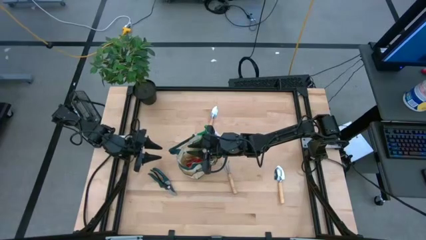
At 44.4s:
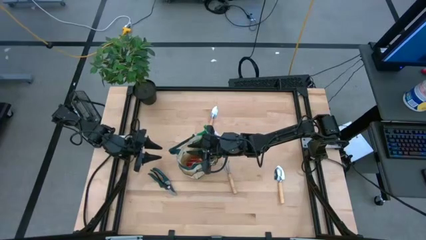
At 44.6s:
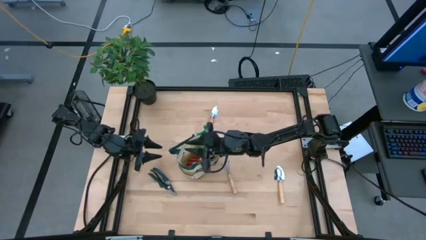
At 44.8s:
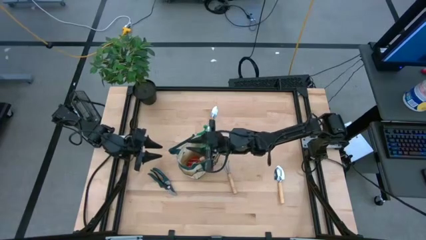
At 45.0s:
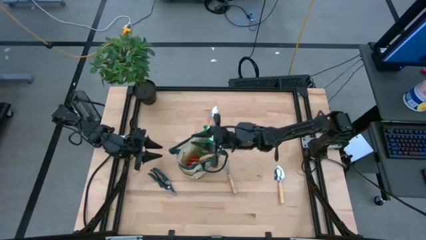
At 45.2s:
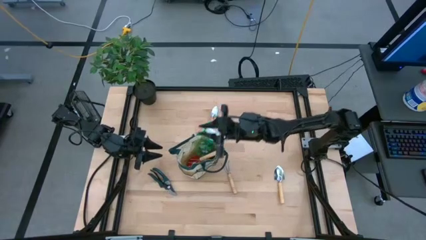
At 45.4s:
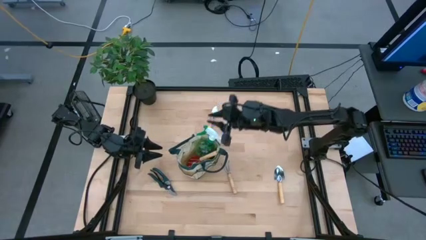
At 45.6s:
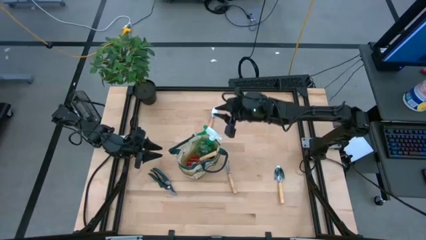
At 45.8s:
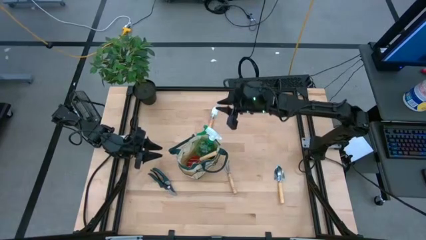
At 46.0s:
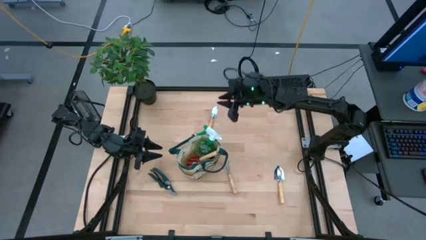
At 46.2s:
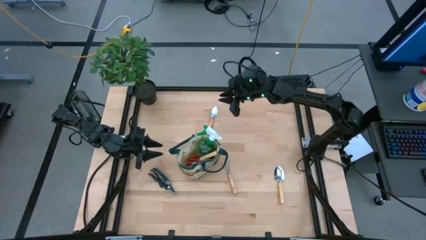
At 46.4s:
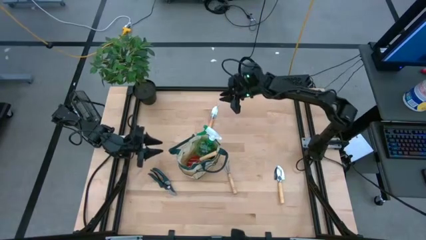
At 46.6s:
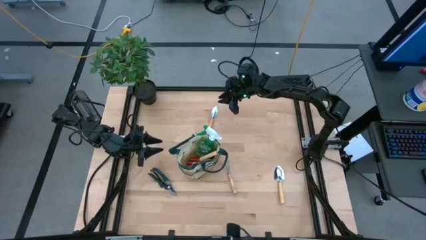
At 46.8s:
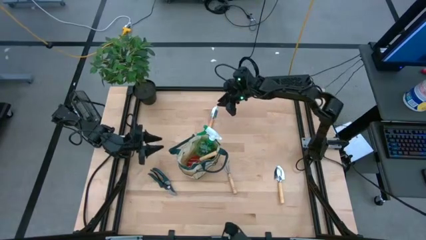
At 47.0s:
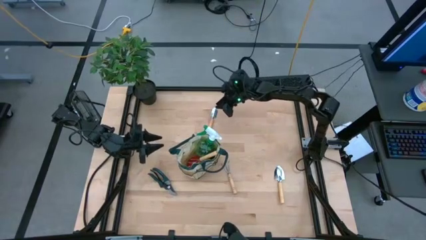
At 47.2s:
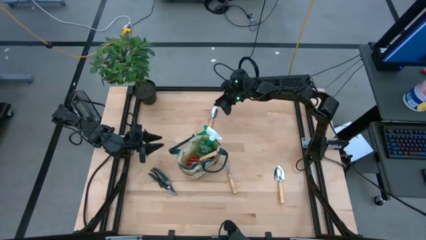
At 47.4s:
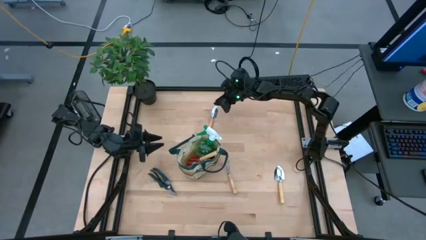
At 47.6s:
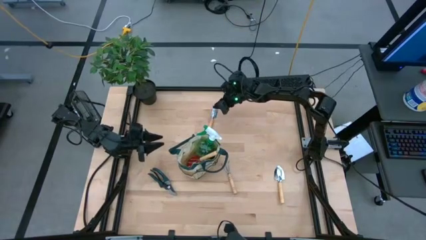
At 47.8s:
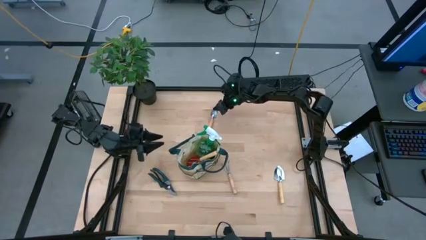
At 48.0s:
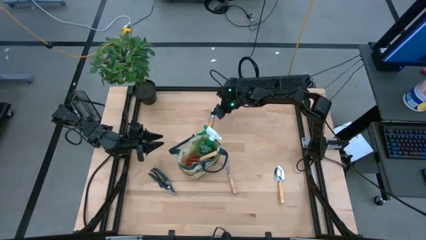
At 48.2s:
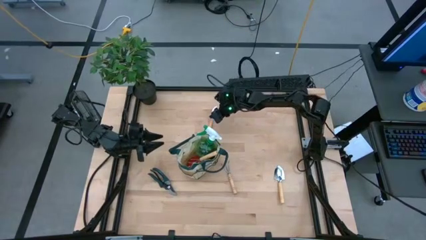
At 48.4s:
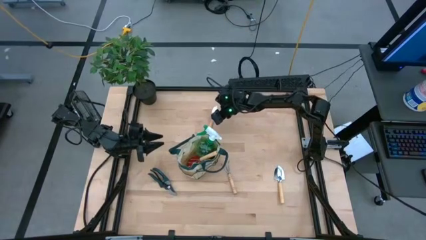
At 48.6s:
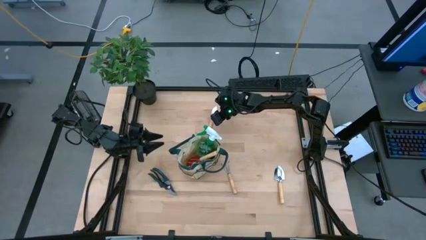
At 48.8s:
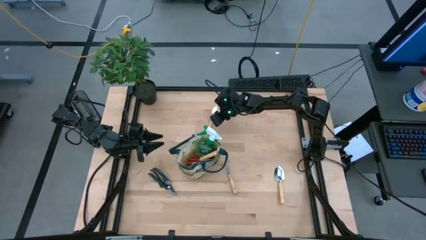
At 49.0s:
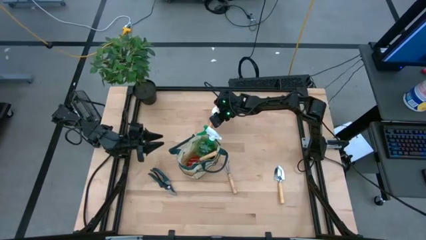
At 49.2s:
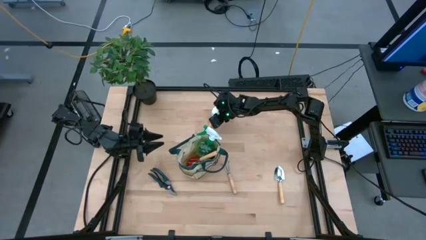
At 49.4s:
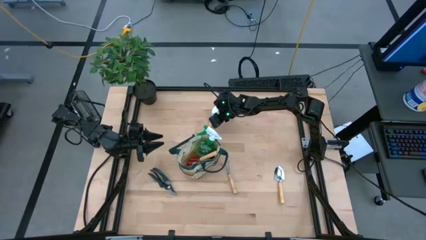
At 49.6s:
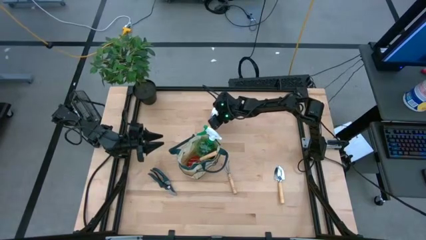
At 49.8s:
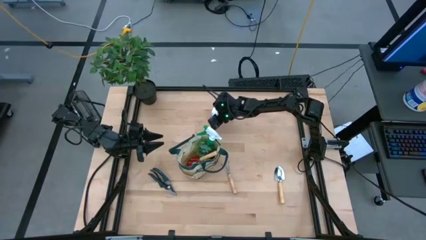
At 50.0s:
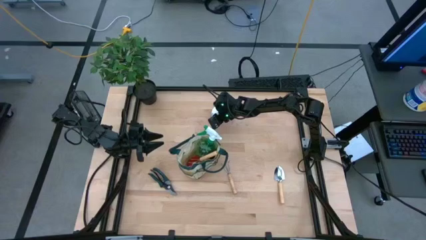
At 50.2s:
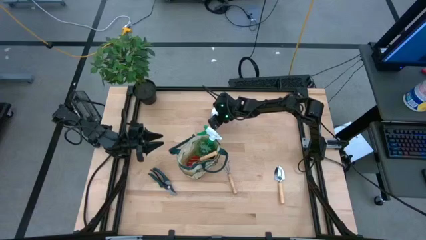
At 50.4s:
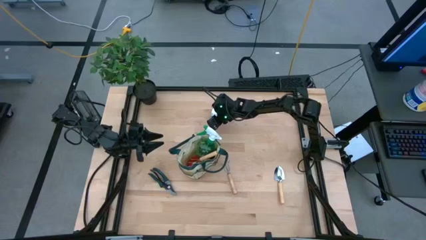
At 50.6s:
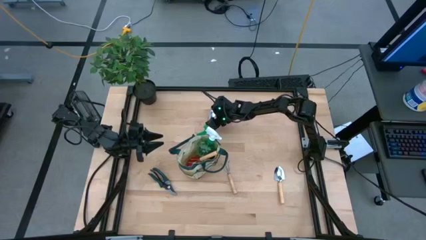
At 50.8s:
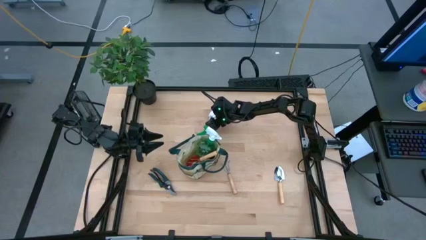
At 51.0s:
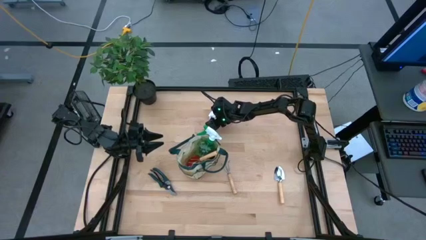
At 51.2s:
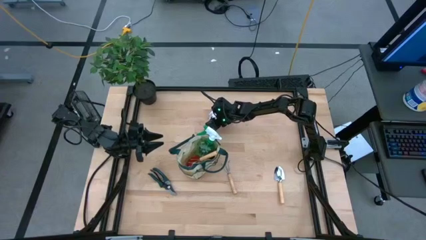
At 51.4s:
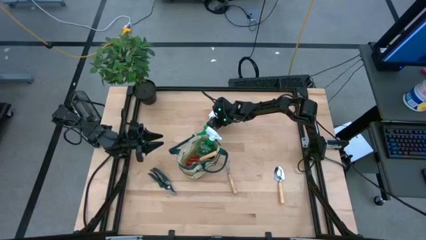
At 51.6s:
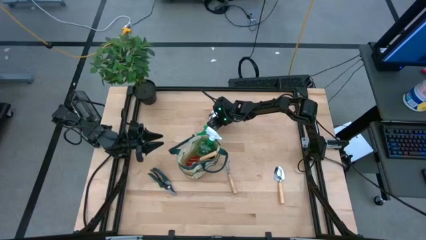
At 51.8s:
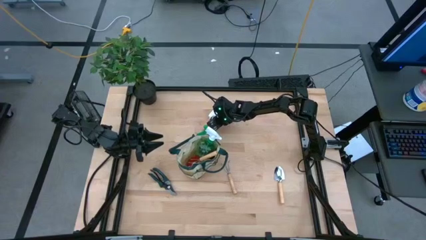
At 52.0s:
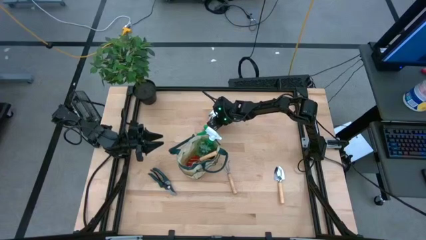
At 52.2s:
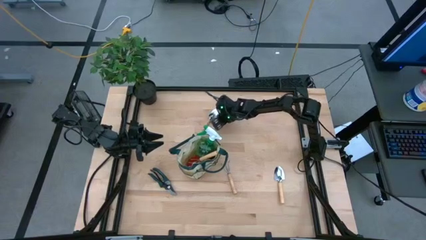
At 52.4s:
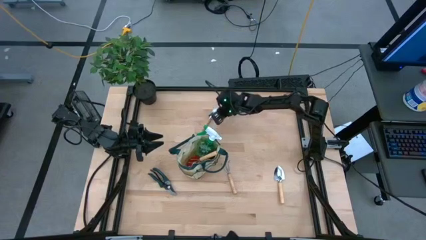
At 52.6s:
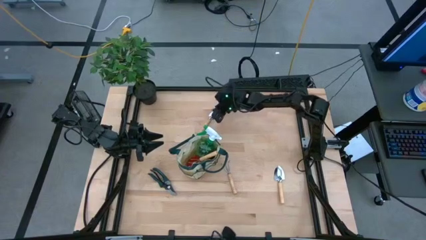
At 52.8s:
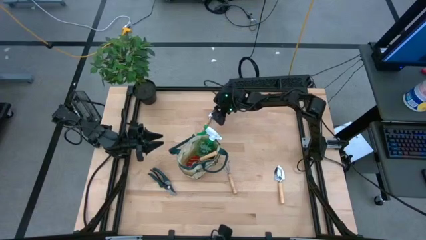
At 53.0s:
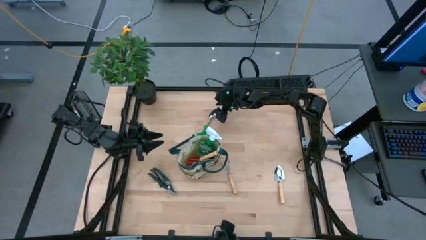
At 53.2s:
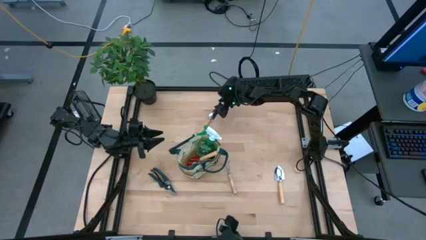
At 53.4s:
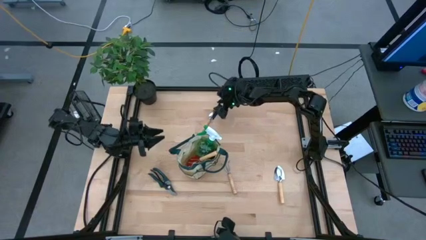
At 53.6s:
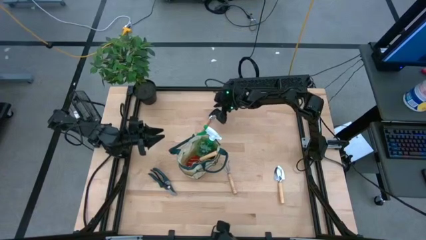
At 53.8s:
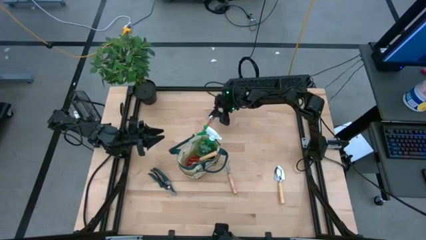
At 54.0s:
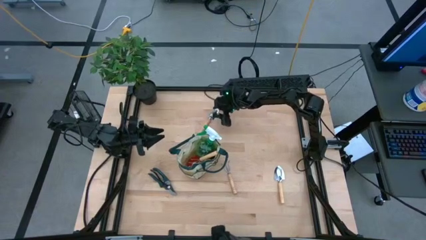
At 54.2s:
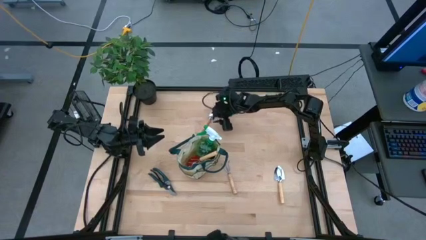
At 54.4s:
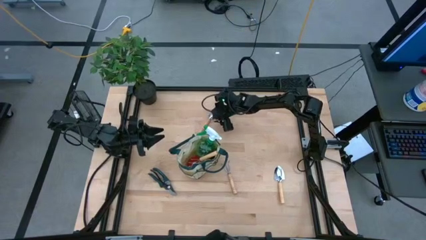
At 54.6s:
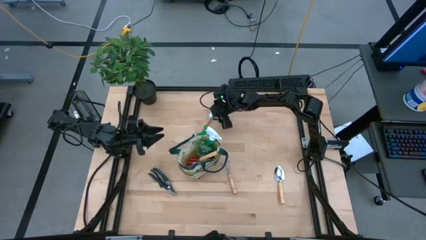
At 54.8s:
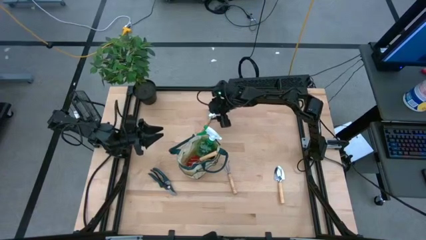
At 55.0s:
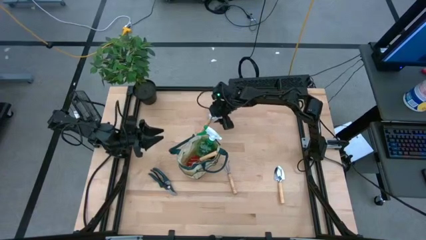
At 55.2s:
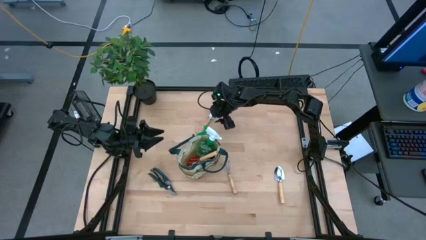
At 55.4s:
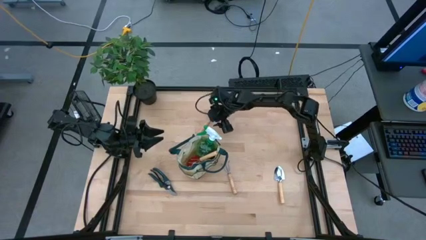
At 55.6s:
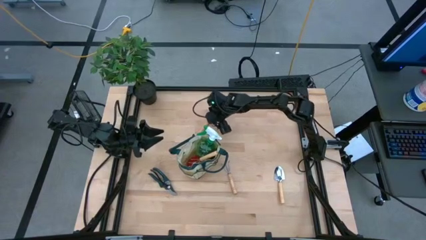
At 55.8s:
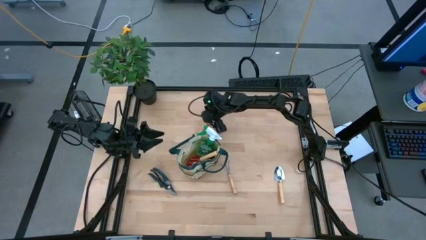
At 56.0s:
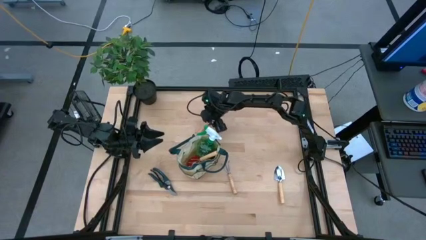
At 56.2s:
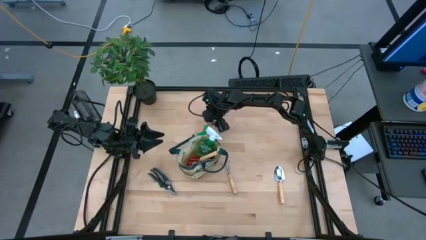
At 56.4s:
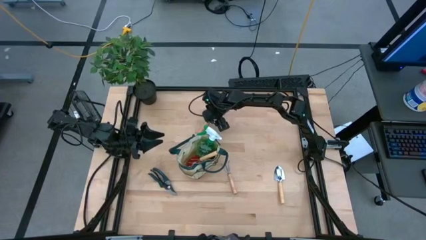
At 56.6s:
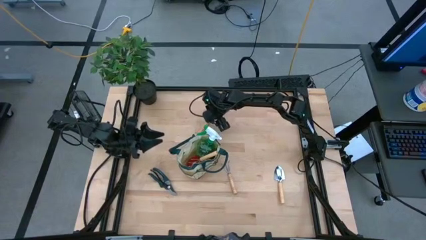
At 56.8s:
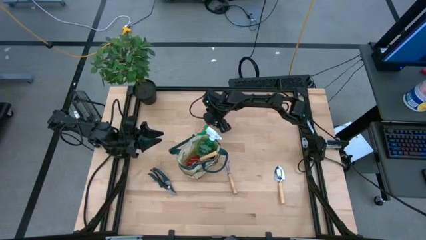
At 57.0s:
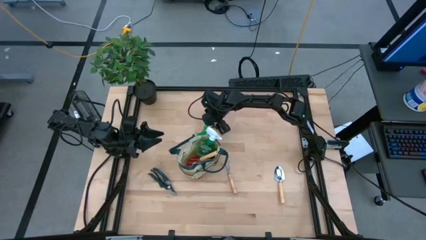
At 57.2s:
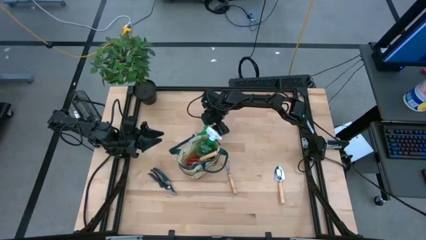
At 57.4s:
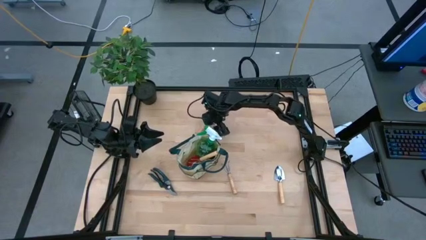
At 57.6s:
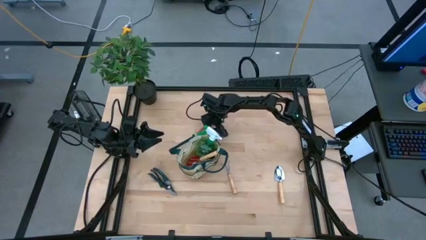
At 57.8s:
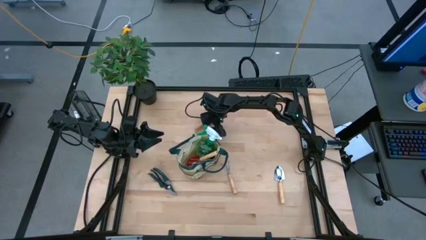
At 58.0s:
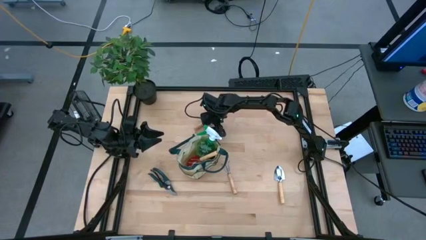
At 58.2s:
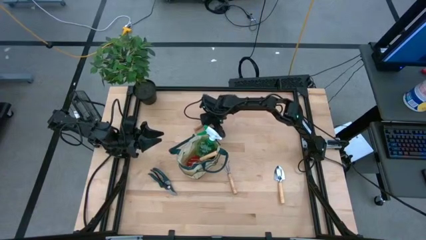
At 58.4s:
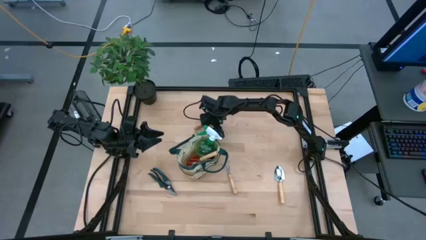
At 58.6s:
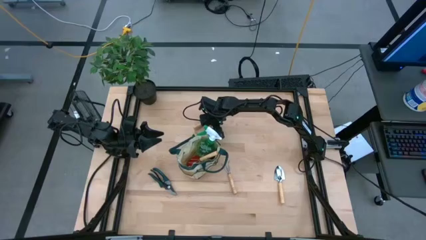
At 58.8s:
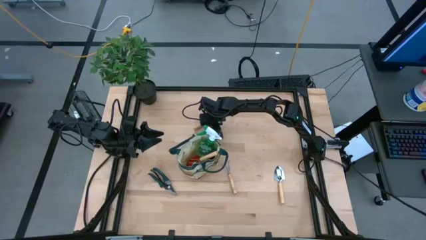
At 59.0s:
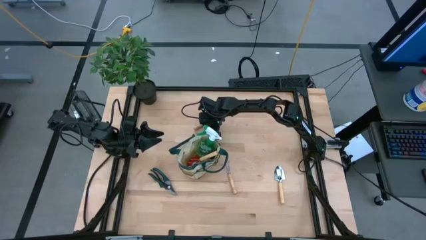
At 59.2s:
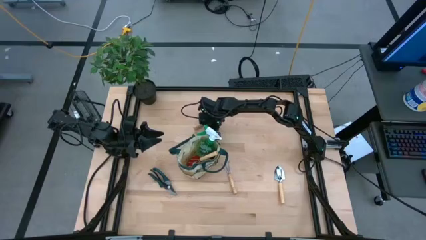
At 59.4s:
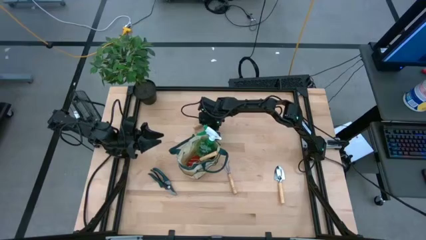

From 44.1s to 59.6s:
Task: Pick & Place Garden tools in Gardening bag
Put the brown trowel into the brown bag
